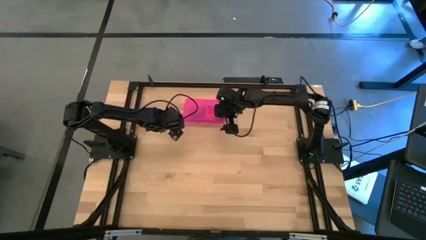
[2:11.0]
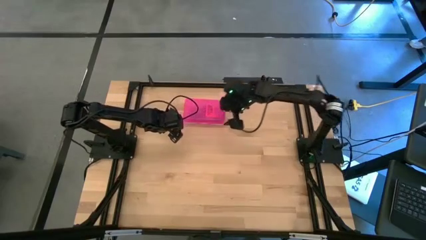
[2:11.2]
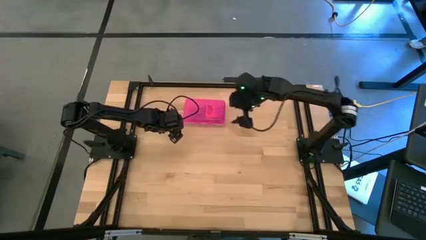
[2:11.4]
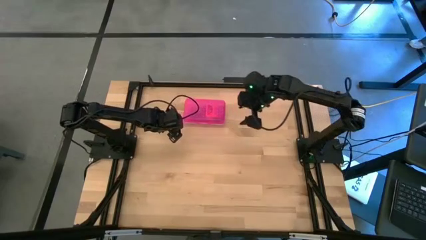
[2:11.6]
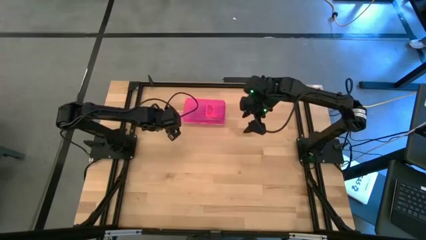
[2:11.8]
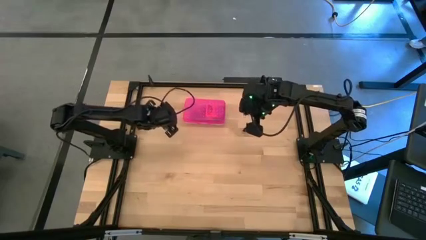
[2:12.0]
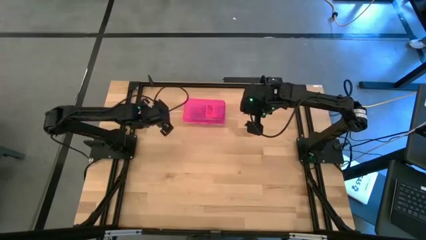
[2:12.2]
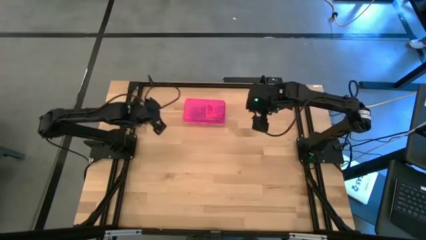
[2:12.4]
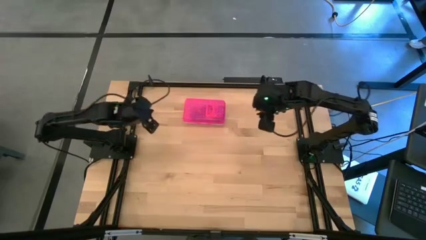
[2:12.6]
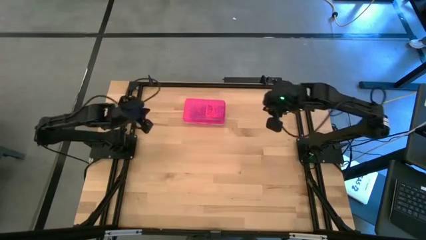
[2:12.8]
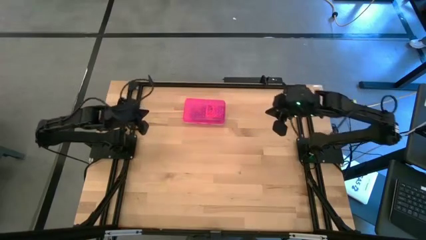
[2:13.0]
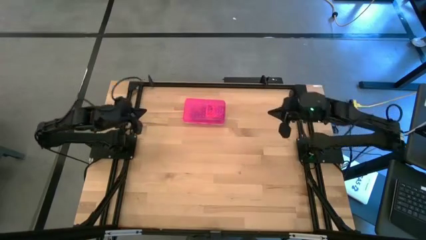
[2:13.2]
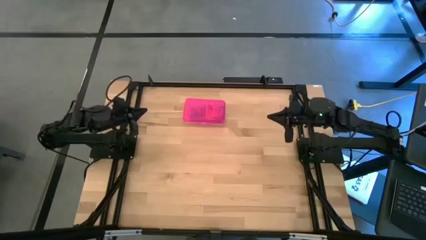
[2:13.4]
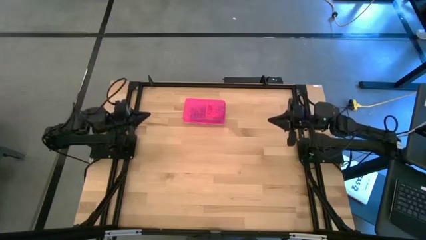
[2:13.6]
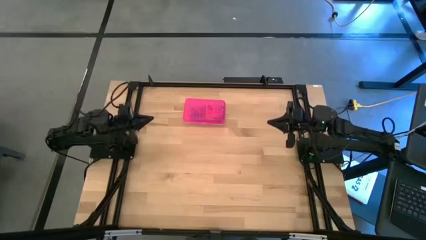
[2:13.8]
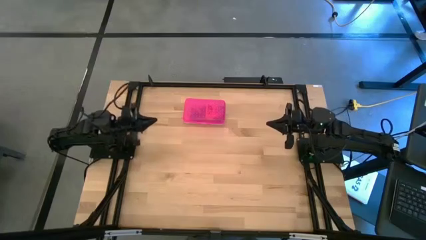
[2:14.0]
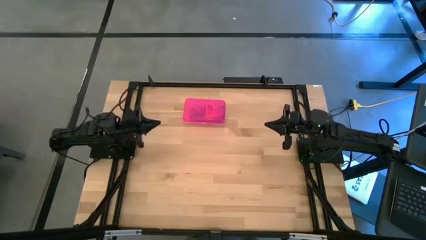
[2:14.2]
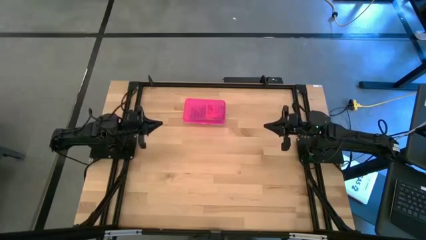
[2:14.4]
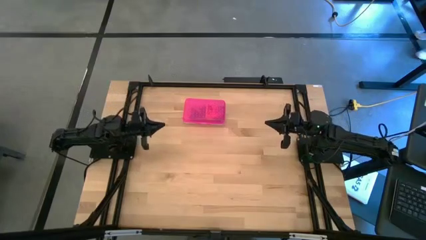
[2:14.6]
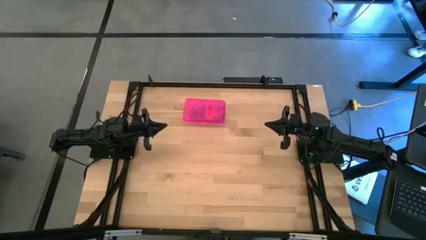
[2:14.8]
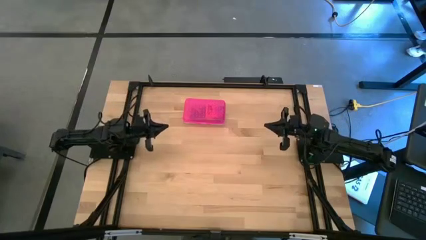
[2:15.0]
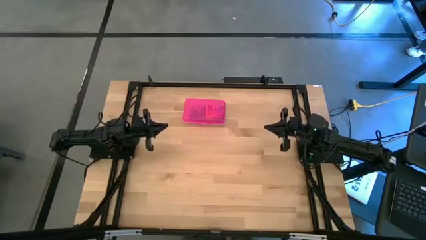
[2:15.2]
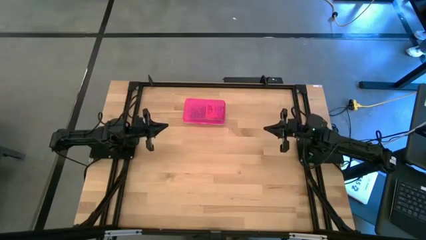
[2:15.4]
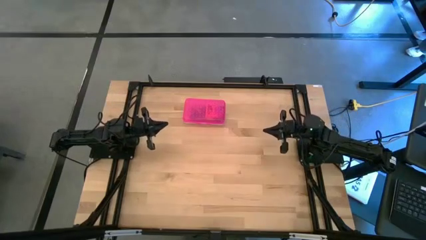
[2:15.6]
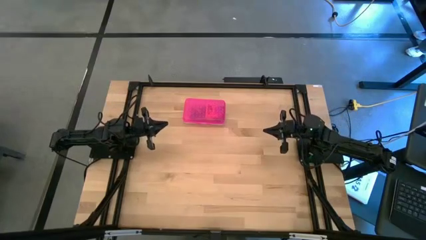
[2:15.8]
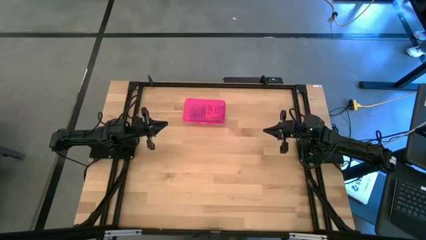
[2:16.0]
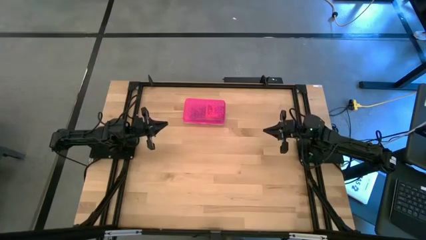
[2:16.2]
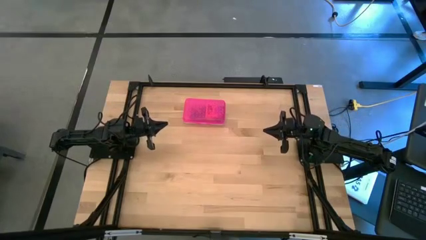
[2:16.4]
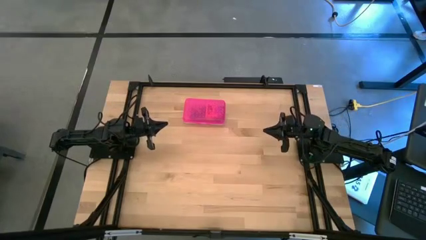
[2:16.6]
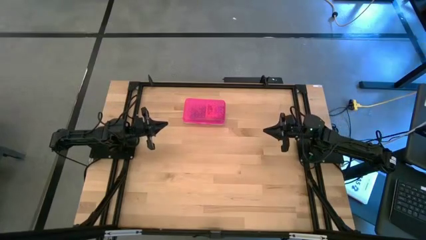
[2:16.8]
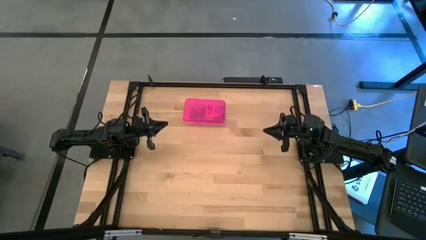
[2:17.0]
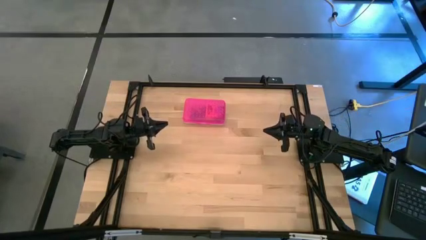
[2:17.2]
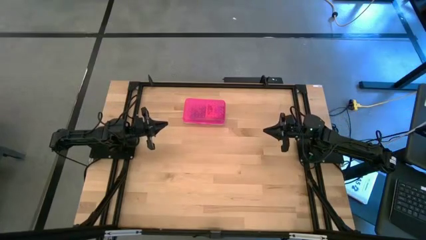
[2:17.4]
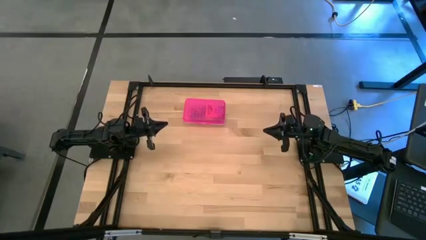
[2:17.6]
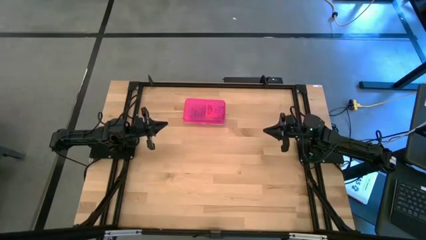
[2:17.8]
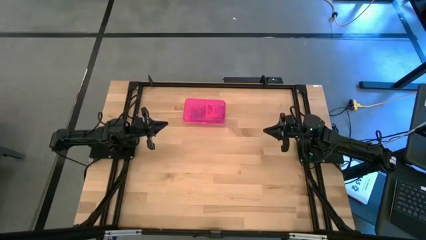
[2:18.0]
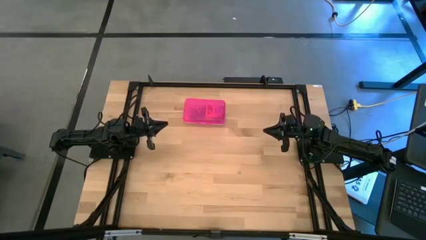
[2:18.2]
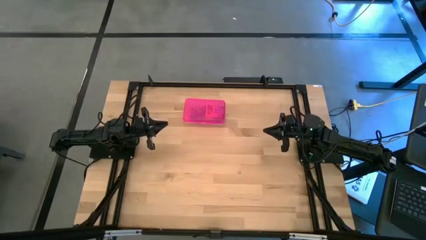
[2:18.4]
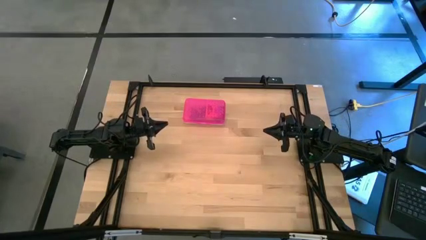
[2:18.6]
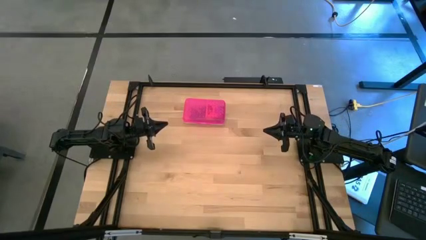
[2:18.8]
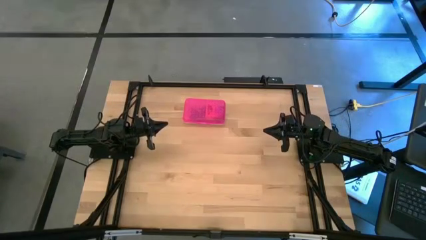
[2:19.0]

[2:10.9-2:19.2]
Task: Pack school essentials
Return to Home Position

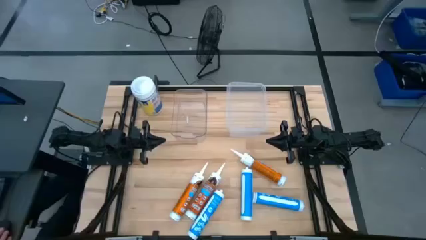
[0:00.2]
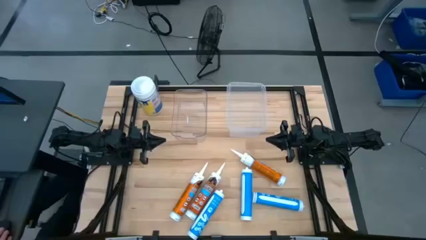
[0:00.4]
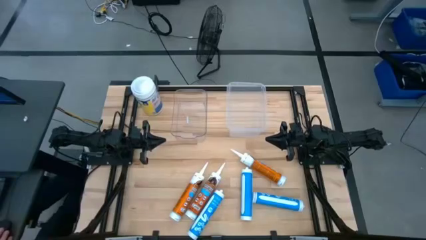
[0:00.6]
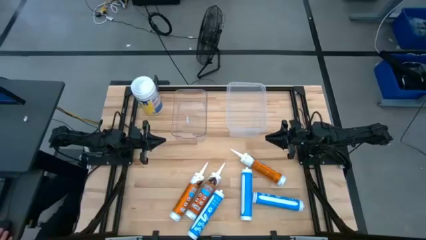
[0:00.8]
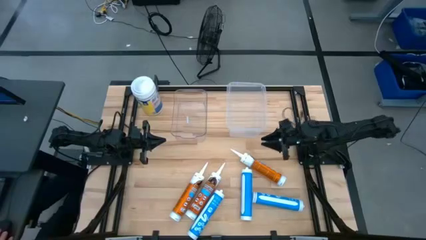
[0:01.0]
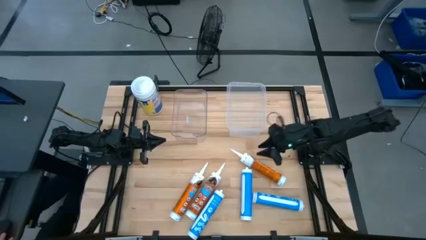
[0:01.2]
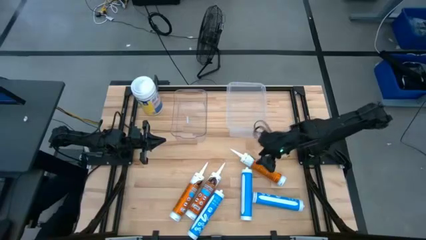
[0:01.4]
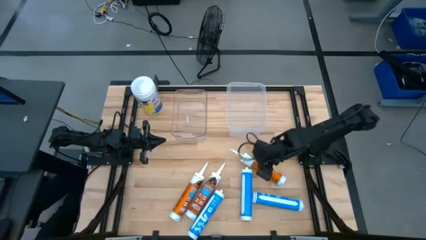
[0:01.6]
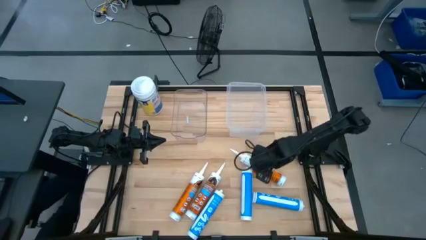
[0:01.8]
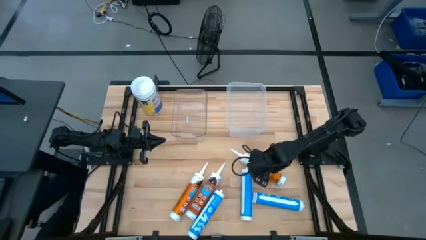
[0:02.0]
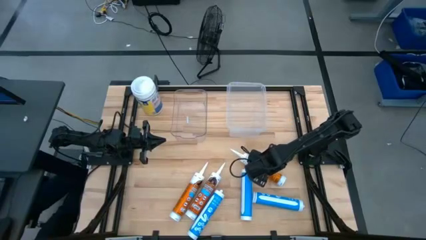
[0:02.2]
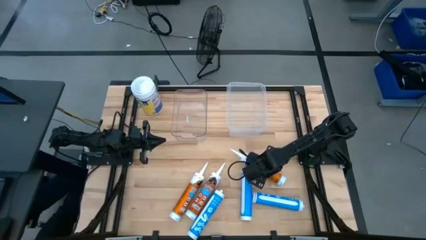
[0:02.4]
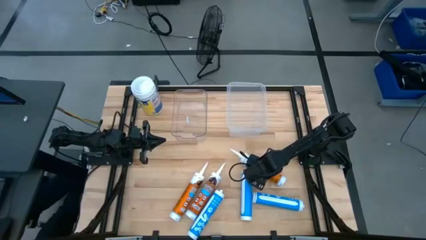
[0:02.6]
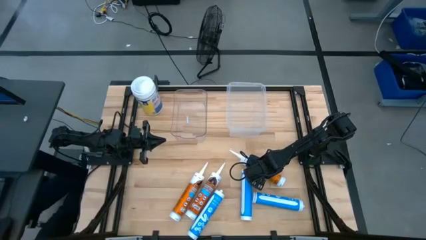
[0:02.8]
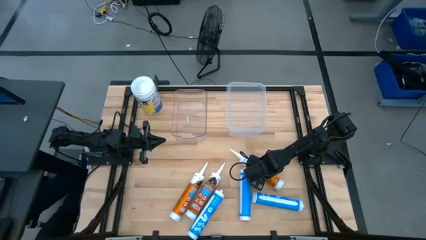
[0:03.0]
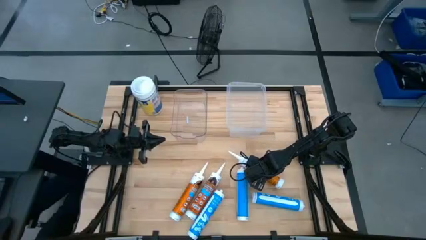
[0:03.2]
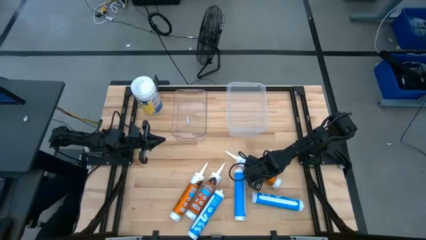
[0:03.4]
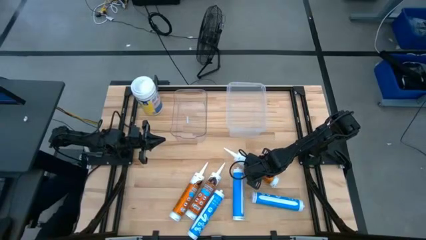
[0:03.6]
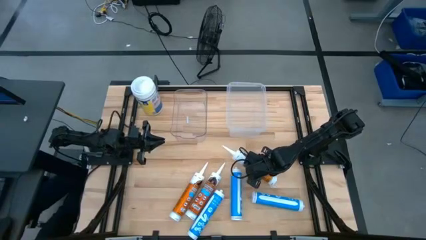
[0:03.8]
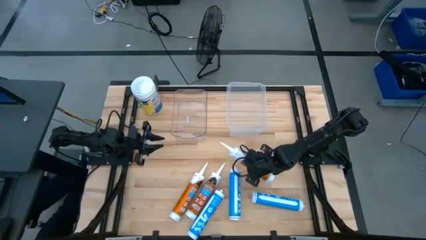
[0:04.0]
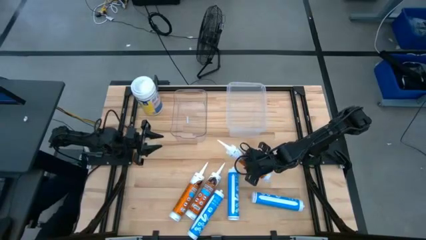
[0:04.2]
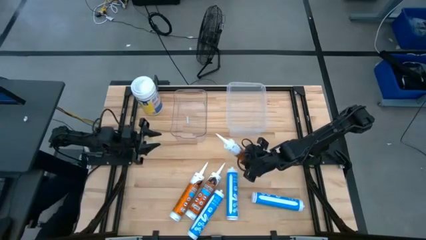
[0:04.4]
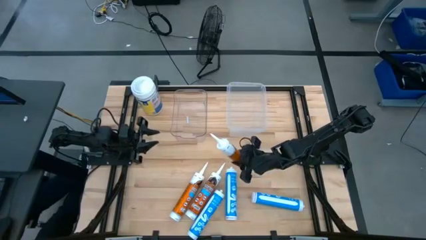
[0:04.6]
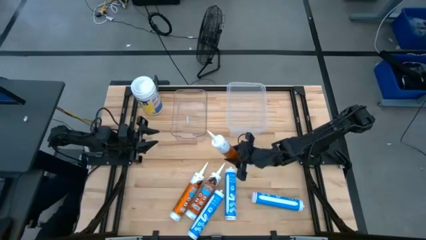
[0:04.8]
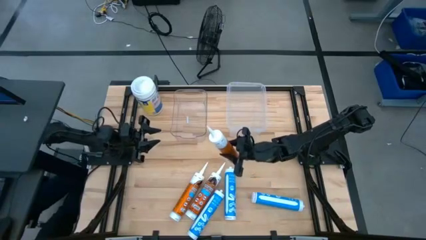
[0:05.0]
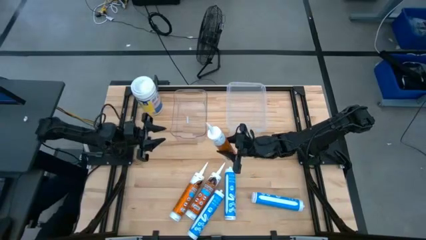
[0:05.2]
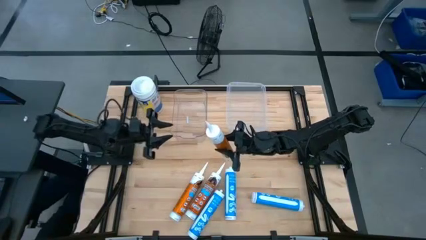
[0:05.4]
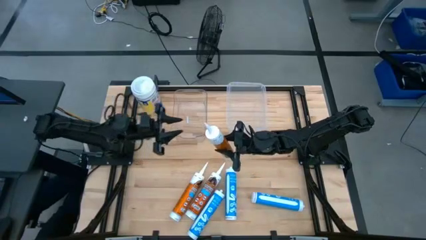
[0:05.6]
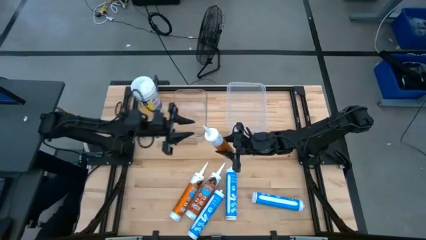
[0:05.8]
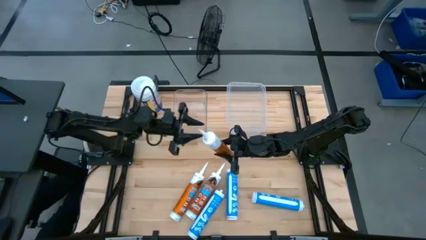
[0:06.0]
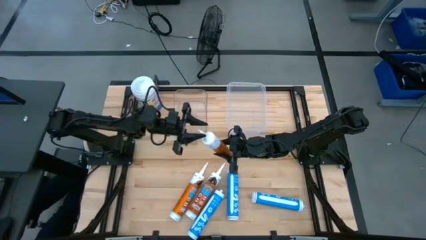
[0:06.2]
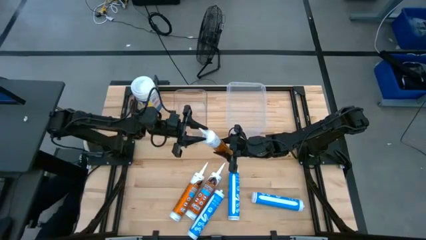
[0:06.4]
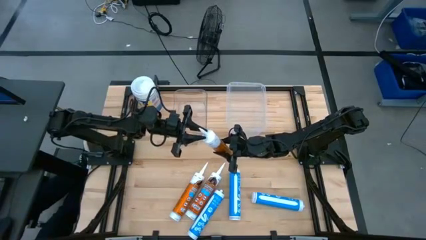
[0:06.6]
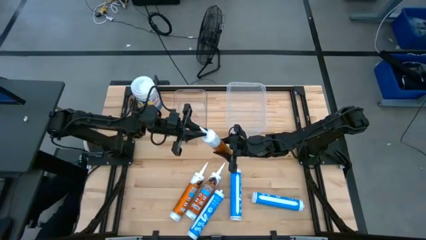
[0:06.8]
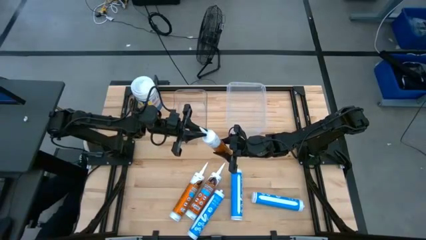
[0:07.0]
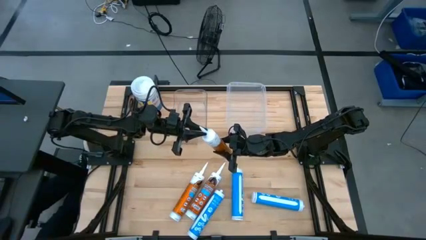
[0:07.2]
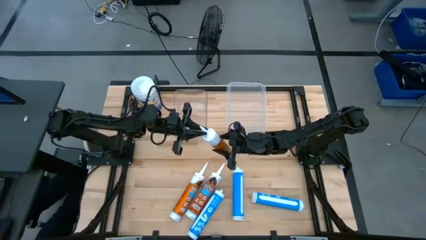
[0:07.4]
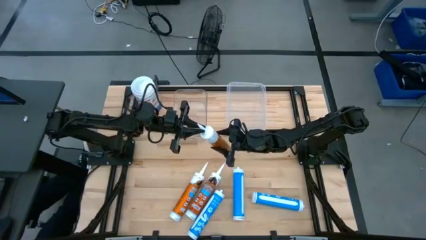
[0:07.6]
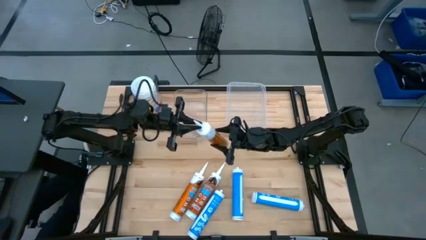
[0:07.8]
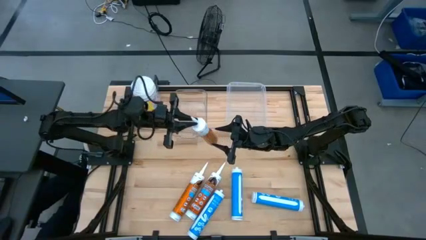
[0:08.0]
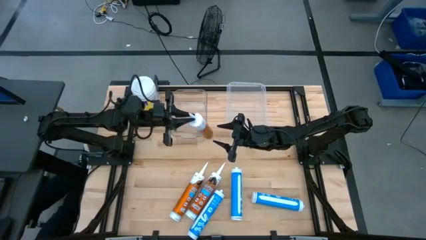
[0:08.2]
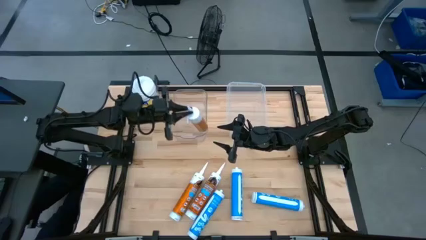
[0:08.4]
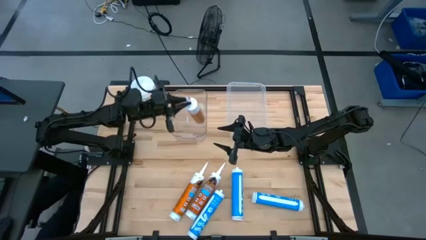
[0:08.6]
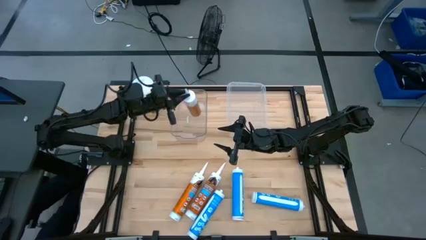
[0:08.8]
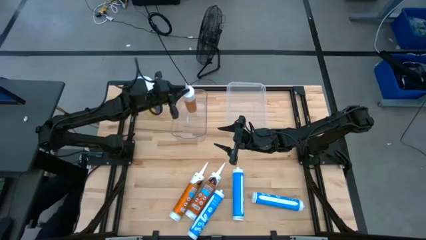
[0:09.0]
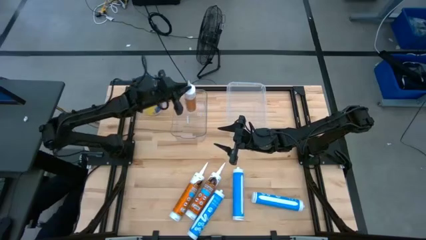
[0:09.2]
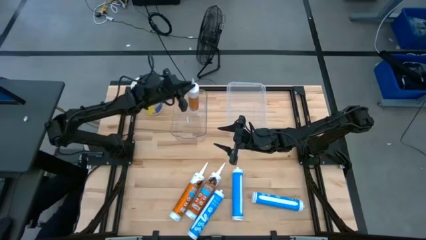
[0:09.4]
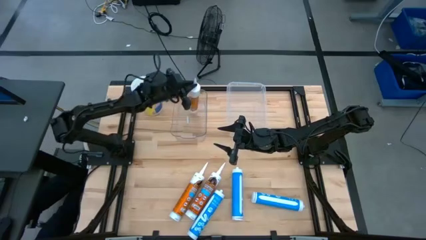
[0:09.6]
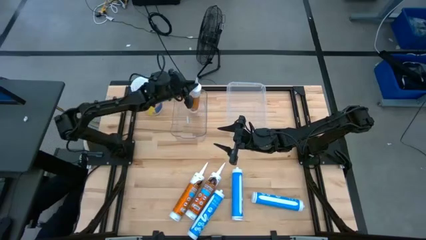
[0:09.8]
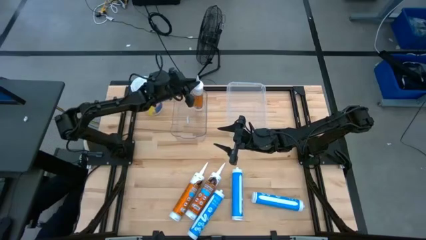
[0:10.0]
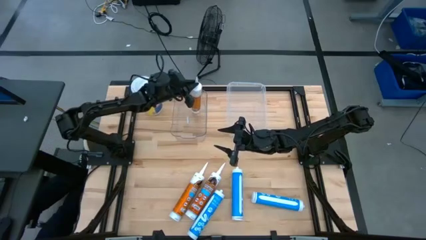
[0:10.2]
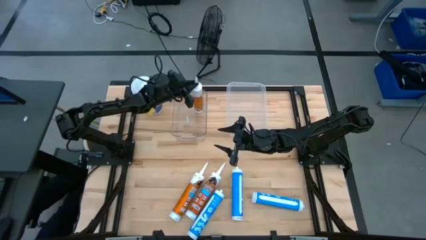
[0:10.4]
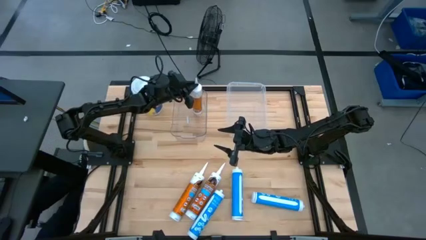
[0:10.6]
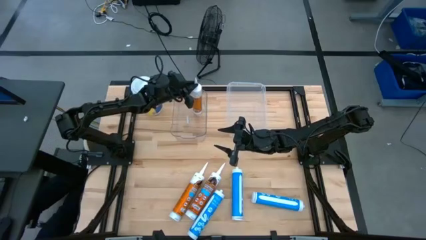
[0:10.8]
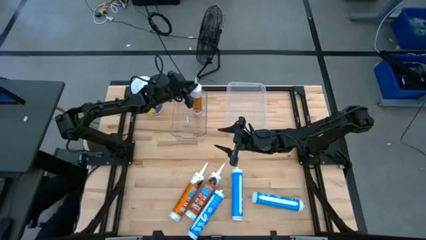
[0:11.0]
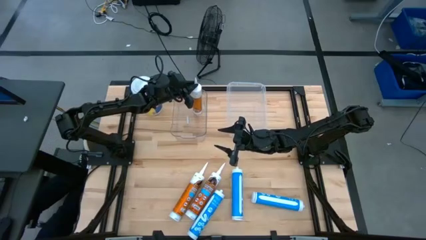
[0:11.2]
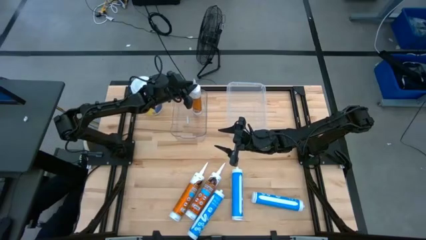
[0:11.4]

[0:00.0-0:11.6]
Task: Pick & place silicon tubes, Sealant and Lysol wipes
Put the top right orange sealant into the left transparent bin
